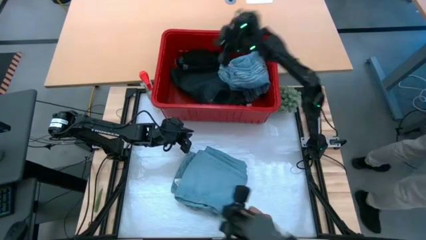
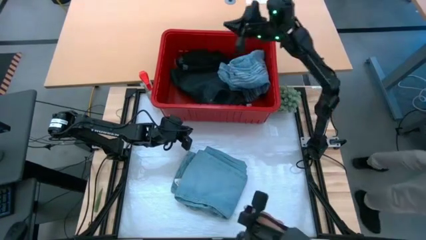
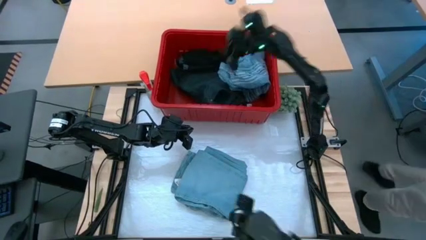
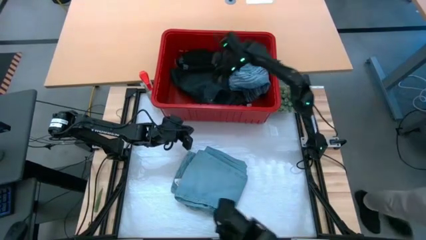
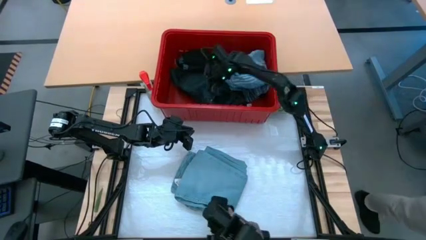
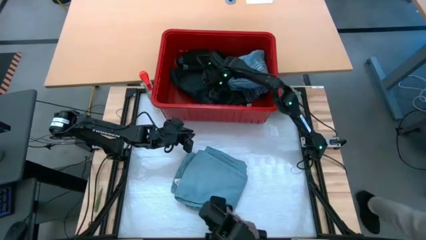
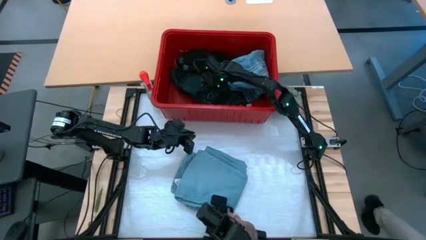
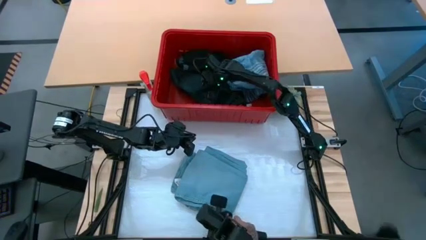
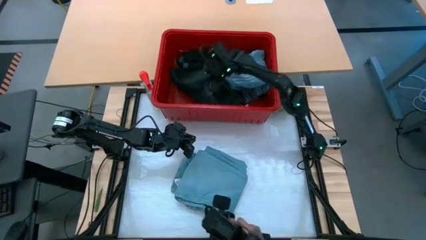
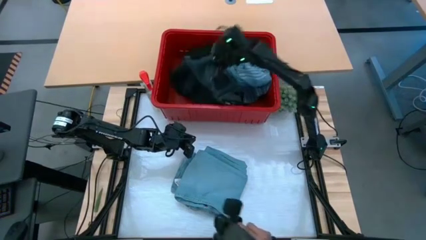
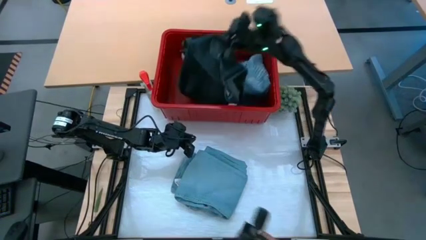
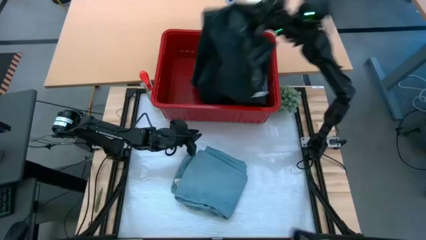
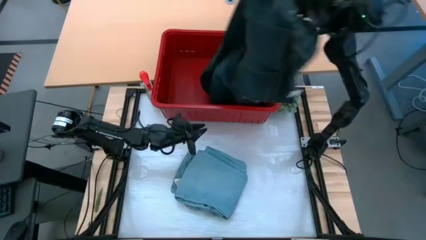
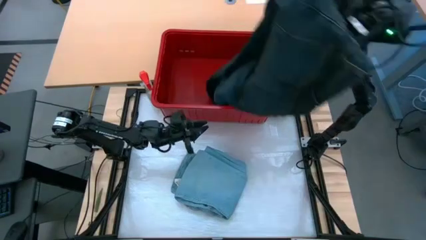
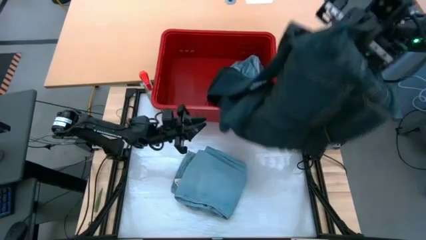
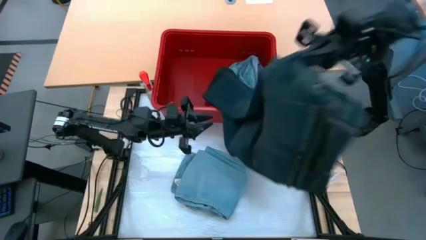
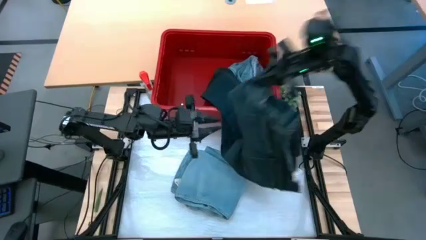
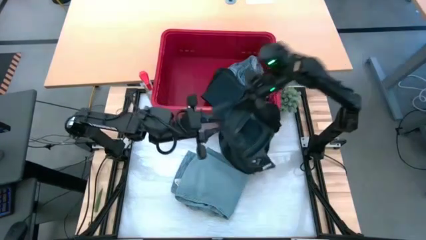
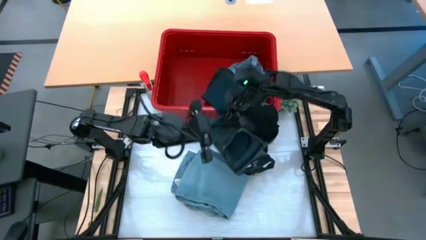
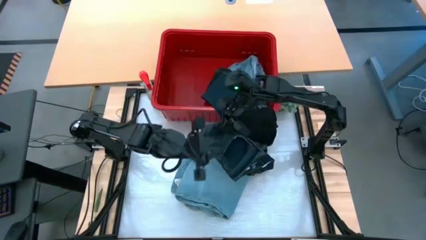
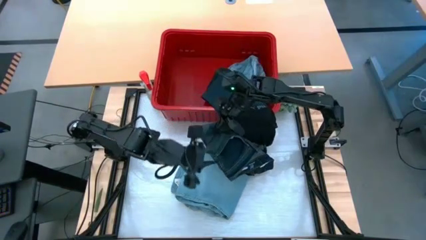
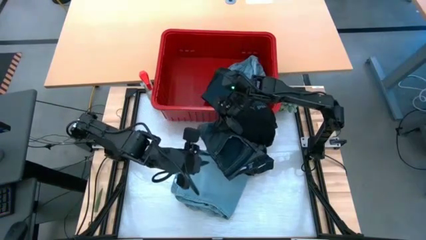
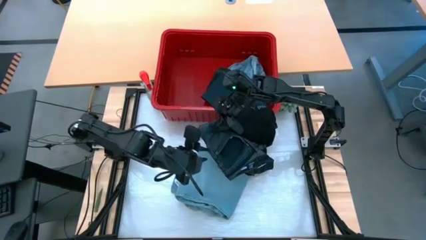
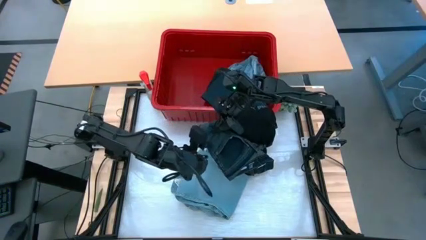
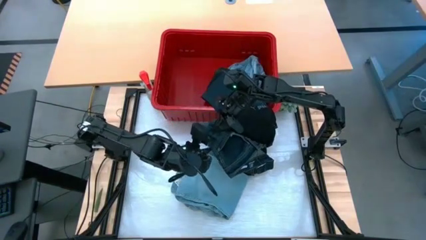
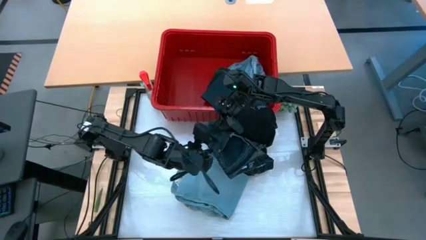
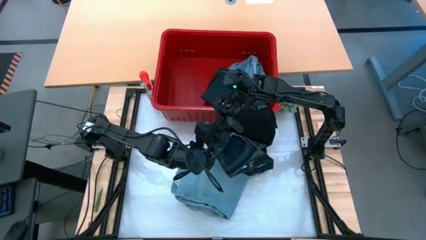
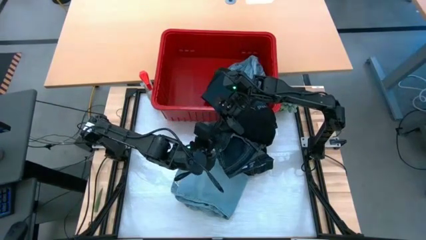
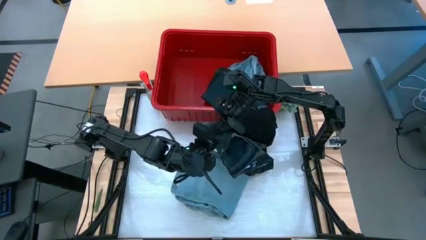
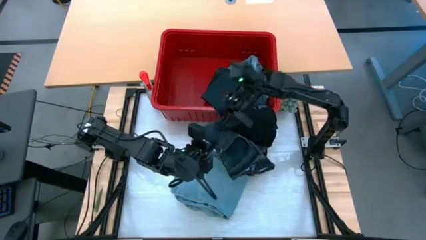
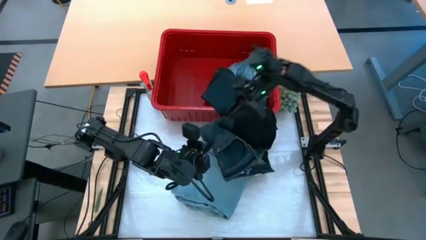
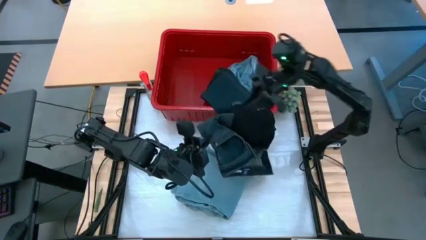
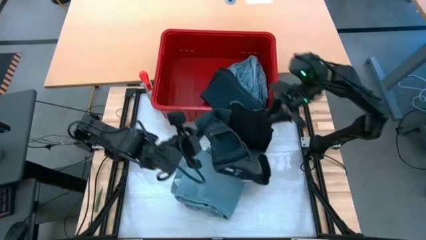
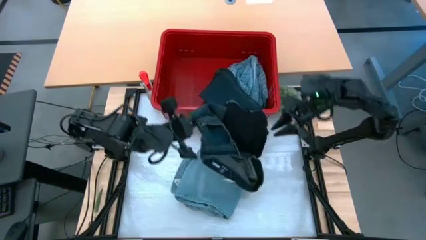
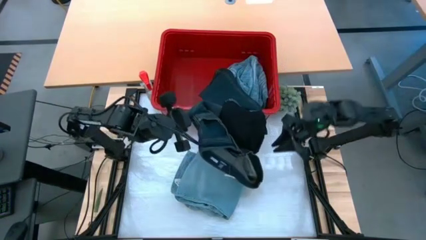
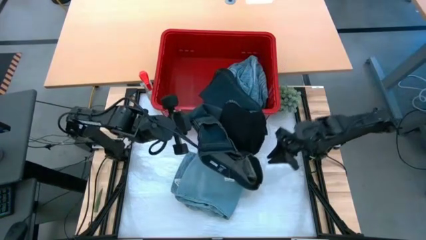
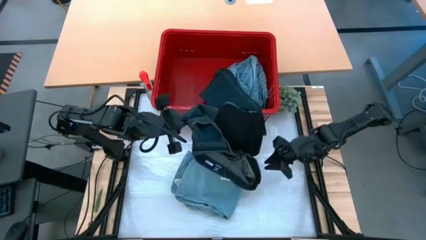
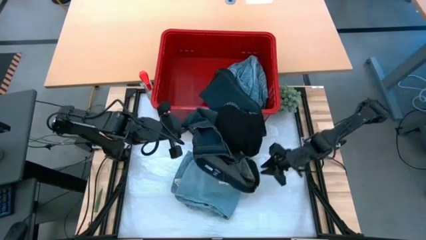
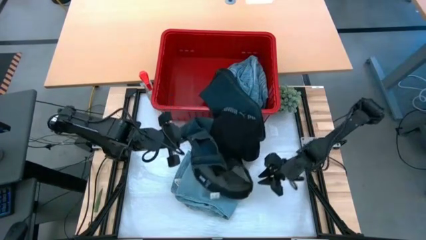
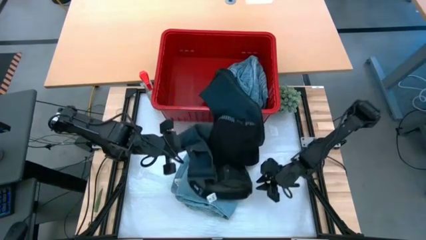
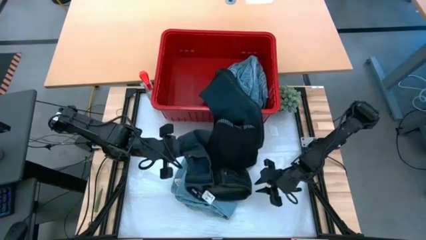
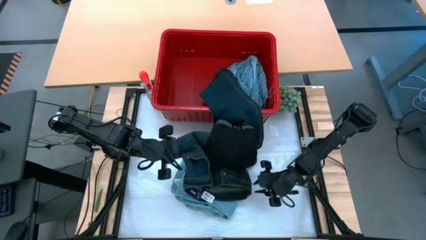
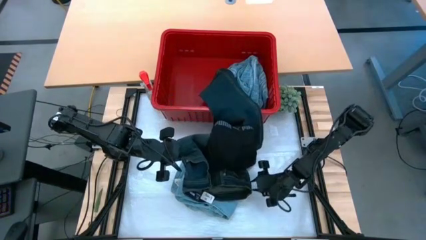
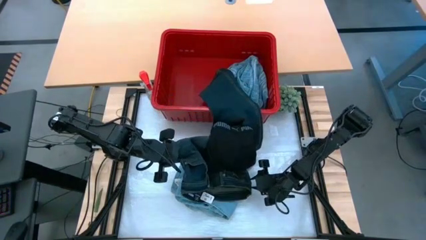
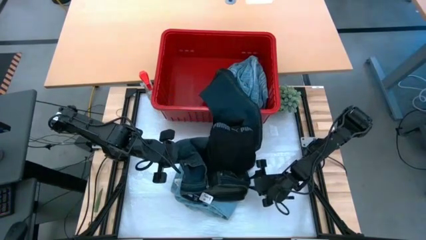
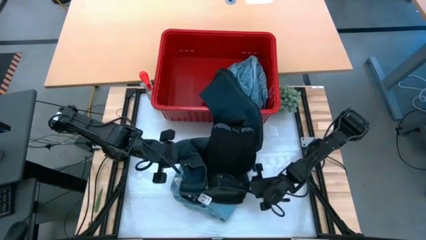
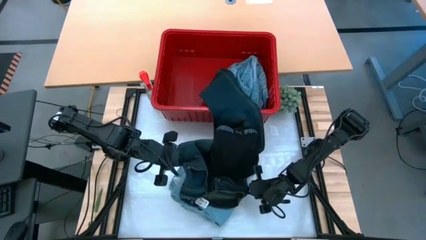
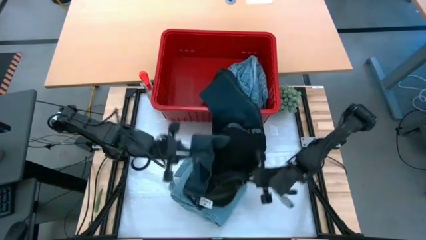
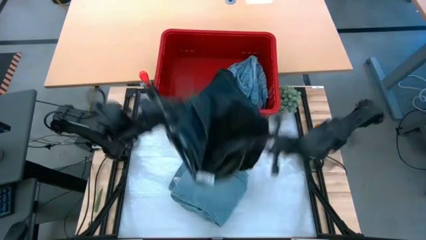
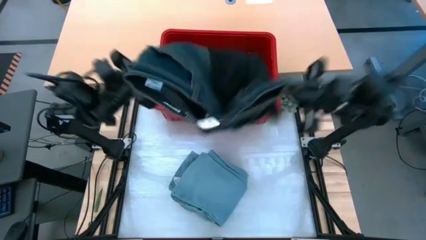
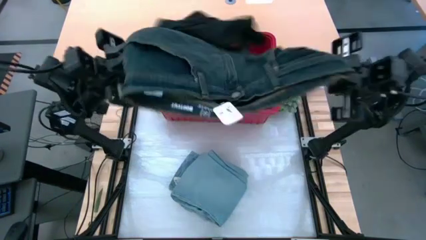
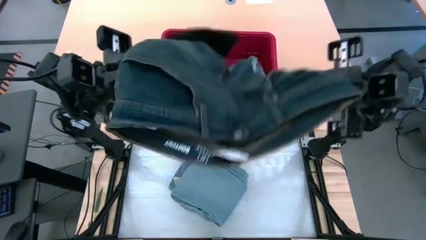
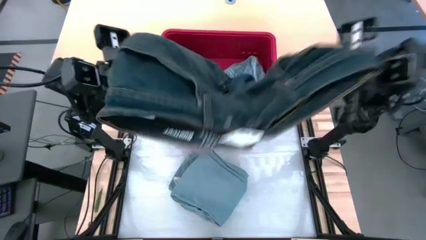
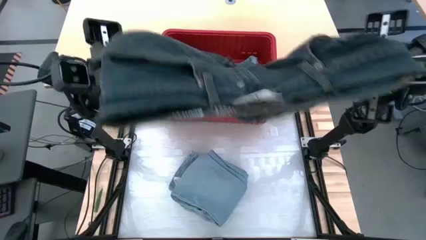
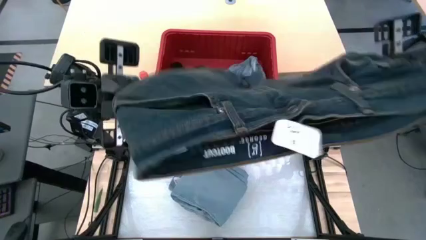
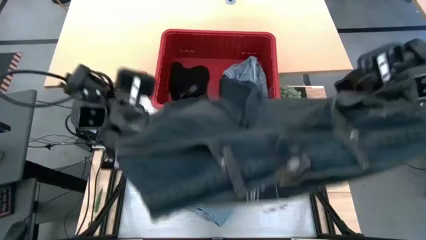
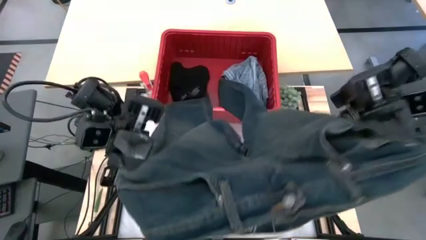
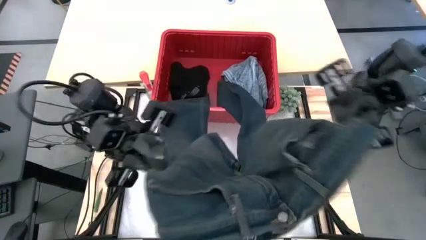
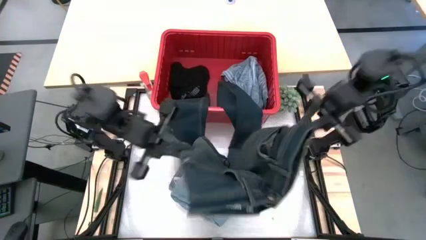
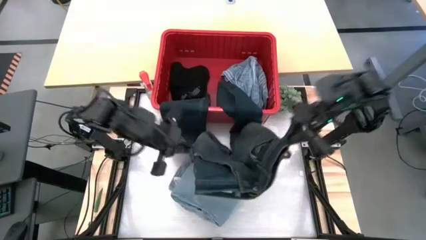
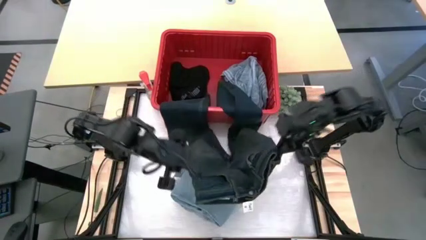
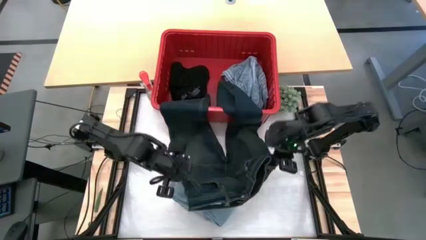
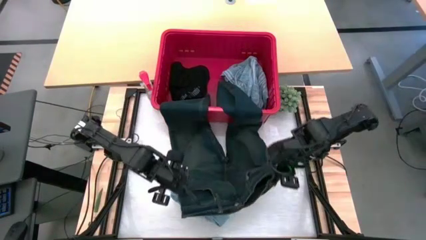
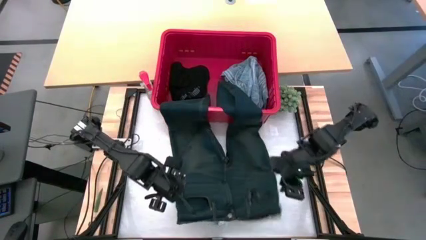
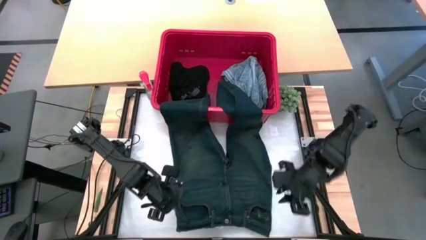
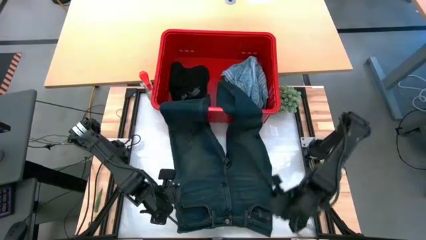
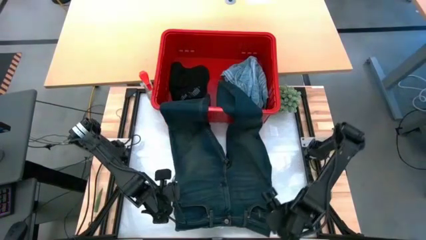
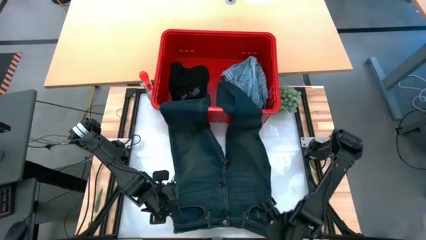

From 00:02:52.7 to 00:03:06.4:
Task: Fold Laundry from Bin
Remove the dark blue pants from the red laundry bin

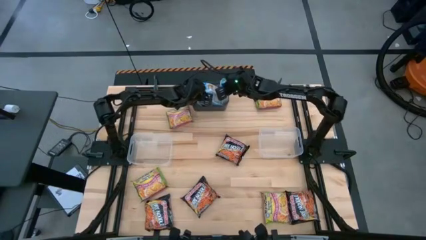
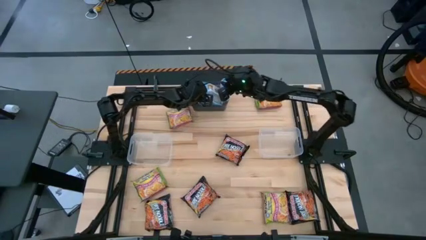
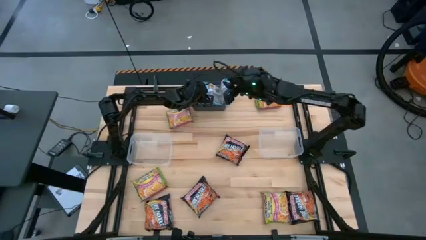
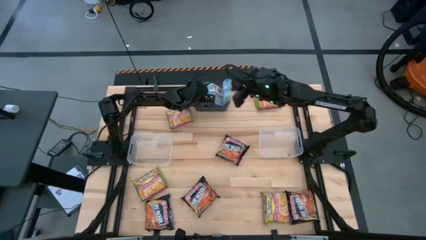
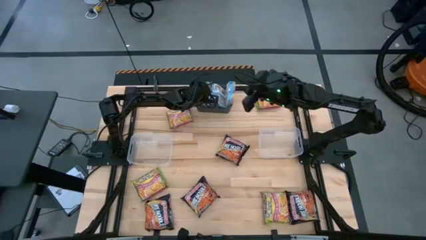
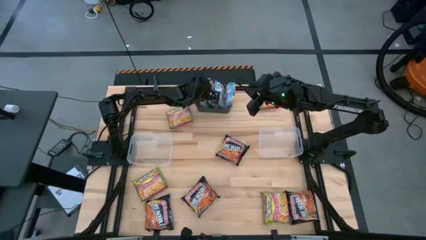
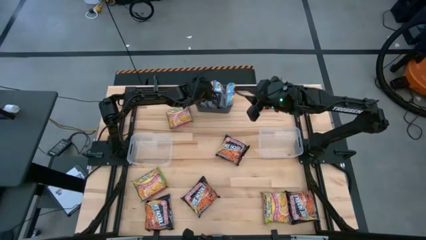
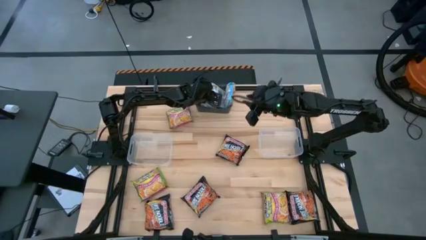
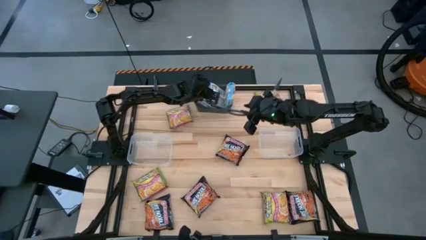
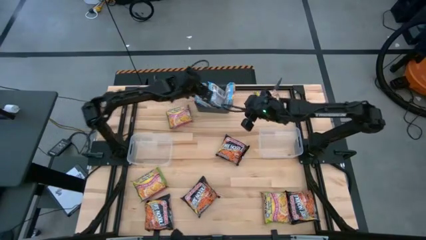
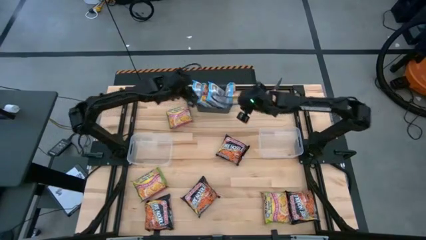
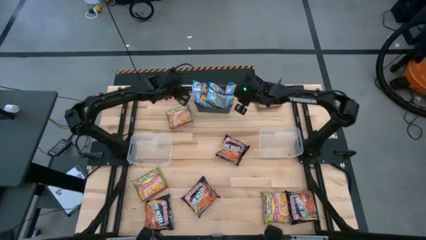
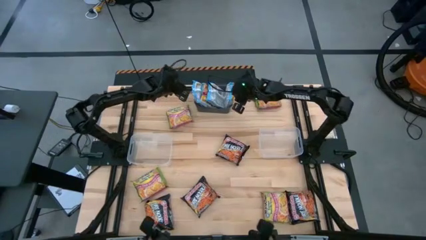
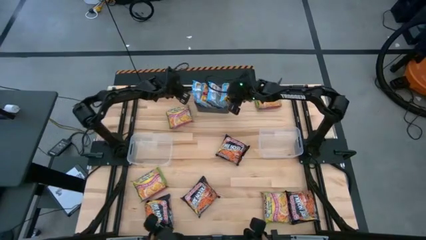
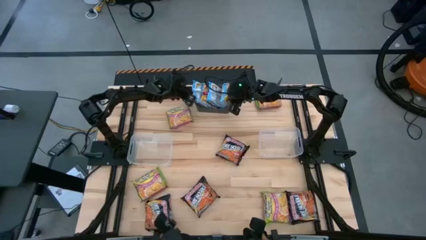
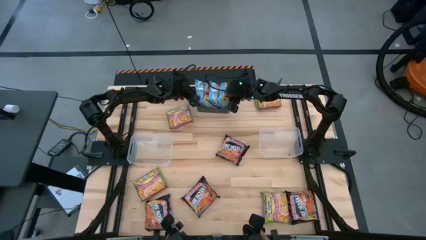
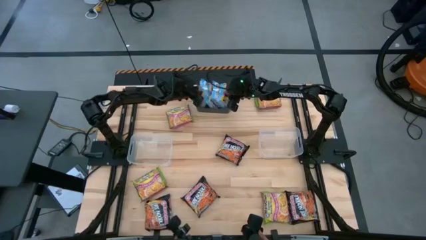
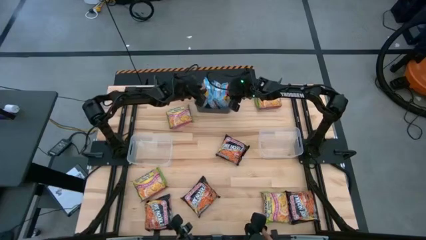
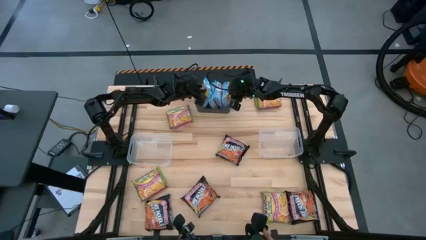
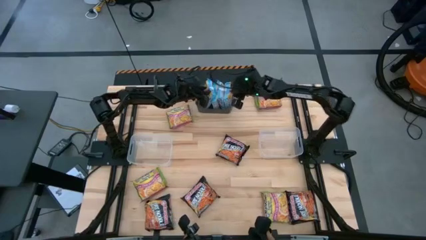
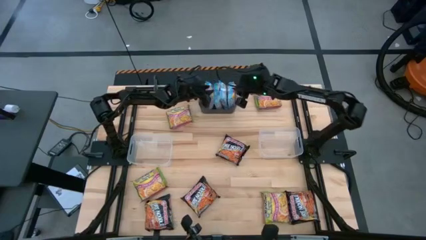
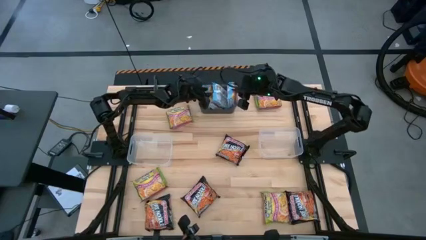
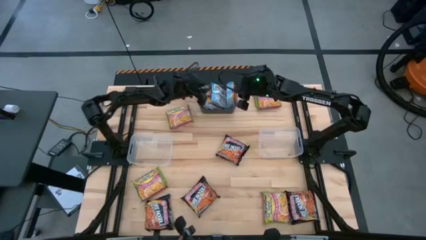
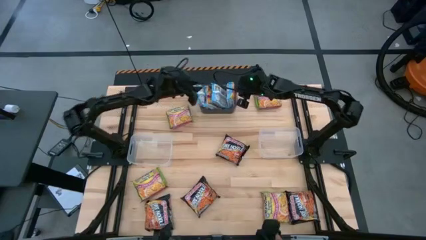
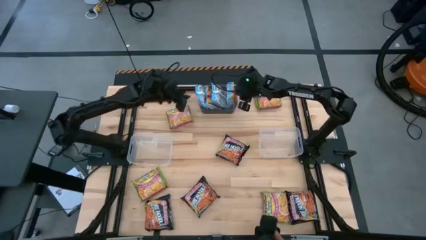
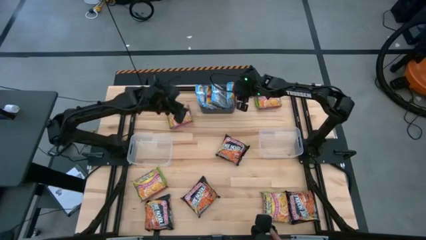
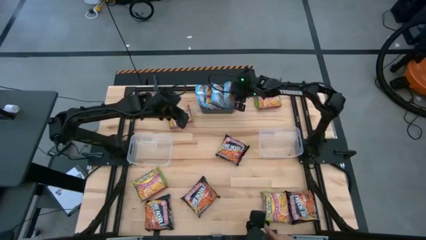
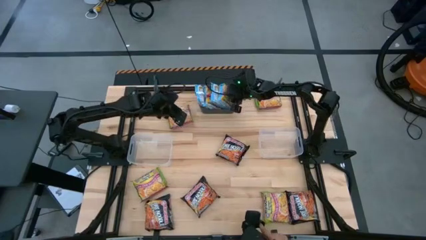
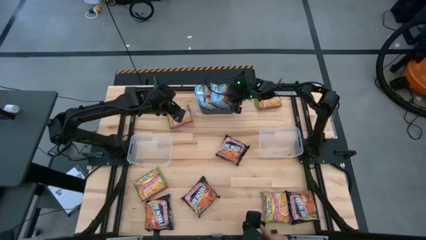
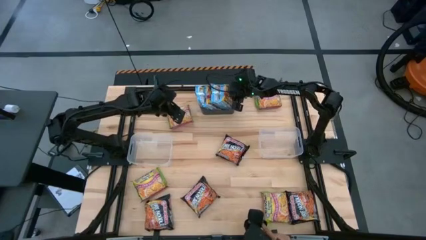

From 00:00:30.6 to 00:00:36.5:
Task: Sort Maruchan noodles
Adjust blue noodle packs in the black bin
